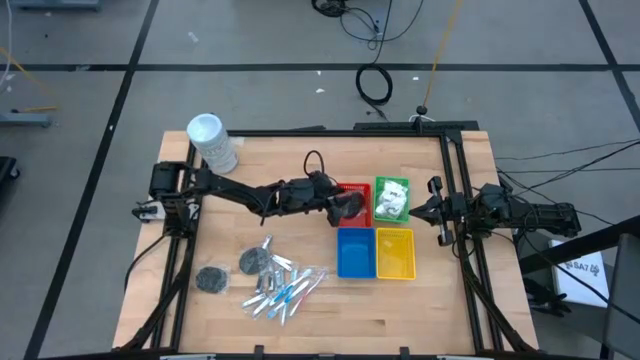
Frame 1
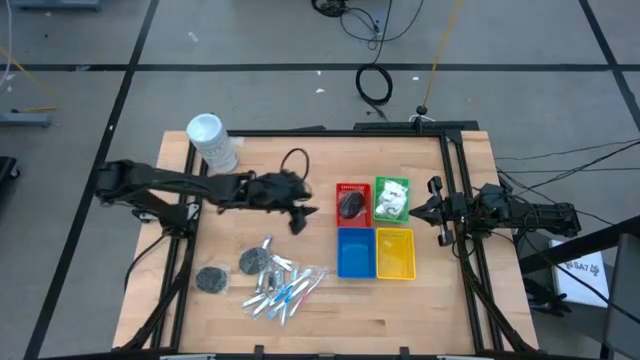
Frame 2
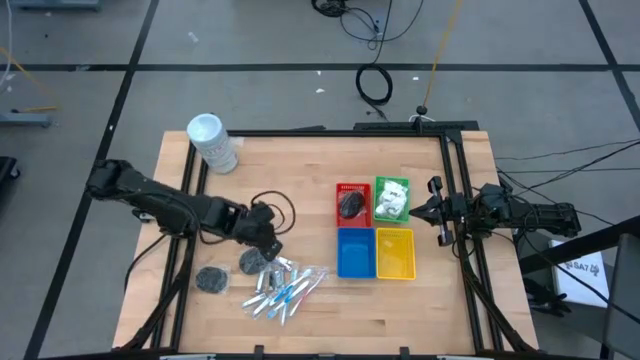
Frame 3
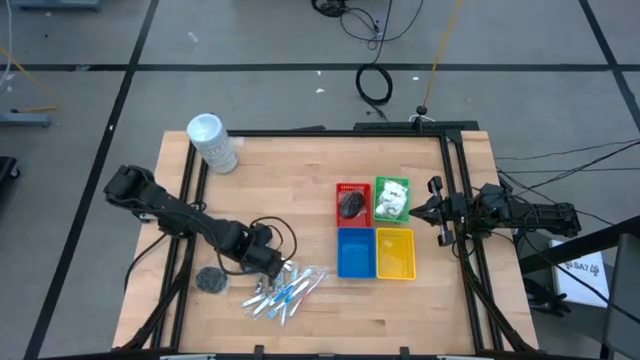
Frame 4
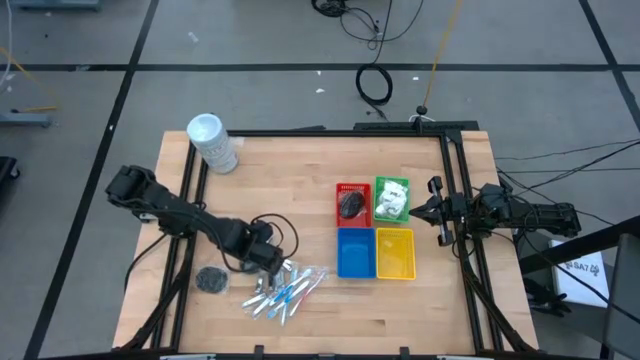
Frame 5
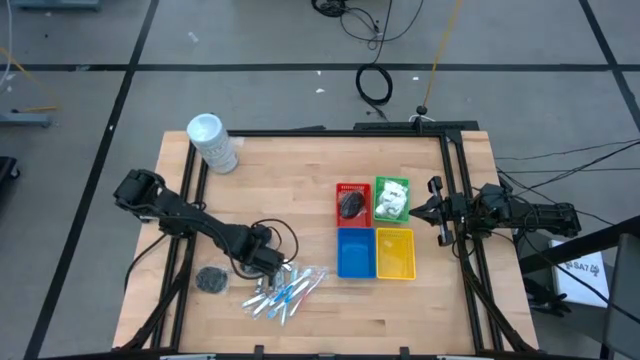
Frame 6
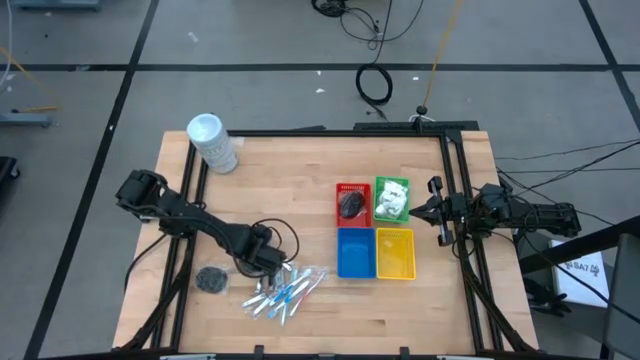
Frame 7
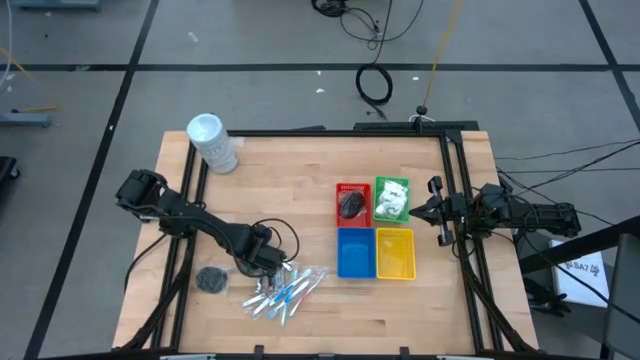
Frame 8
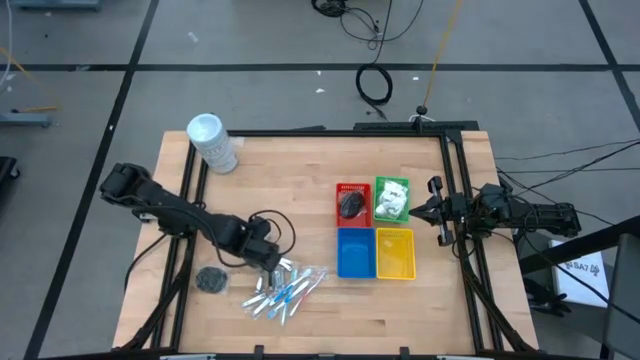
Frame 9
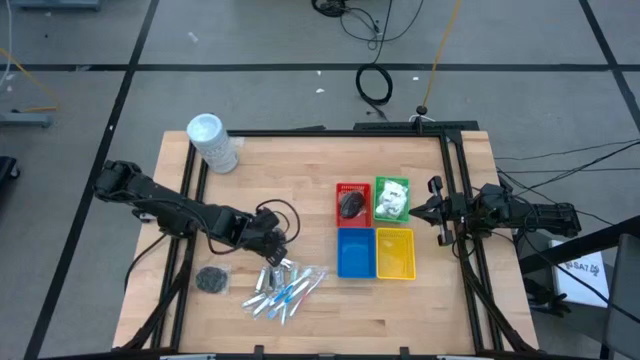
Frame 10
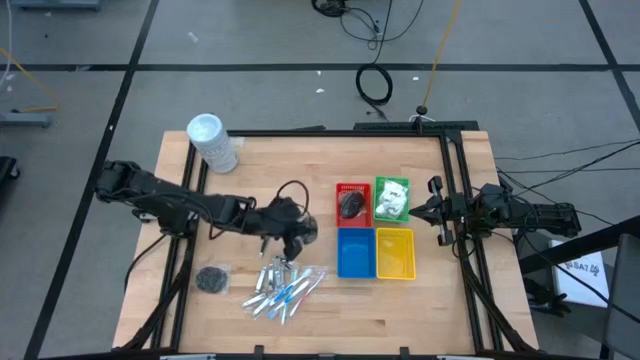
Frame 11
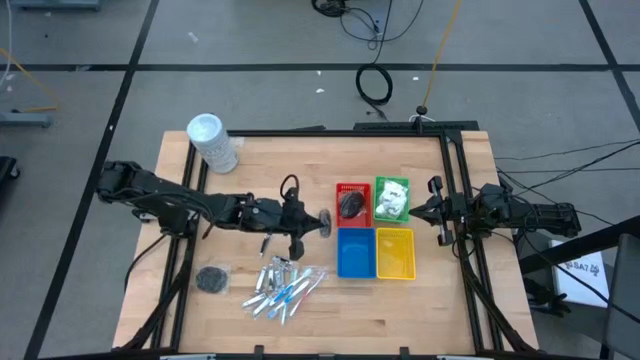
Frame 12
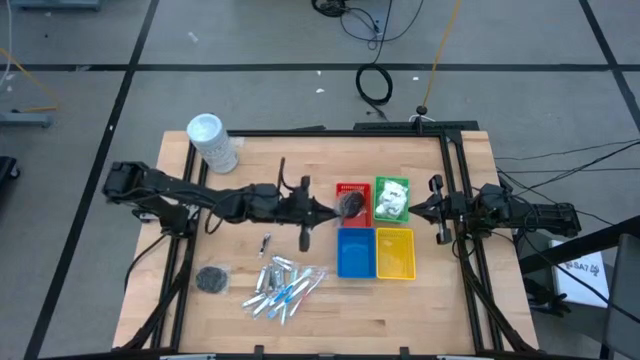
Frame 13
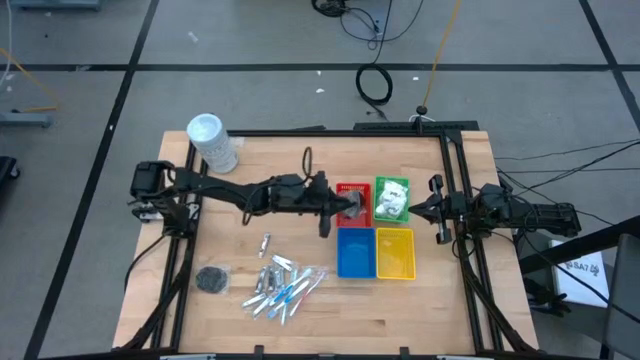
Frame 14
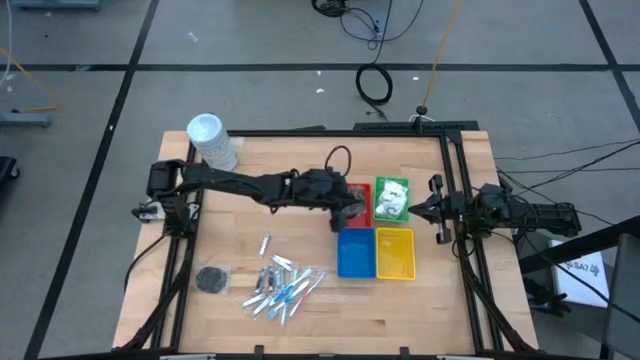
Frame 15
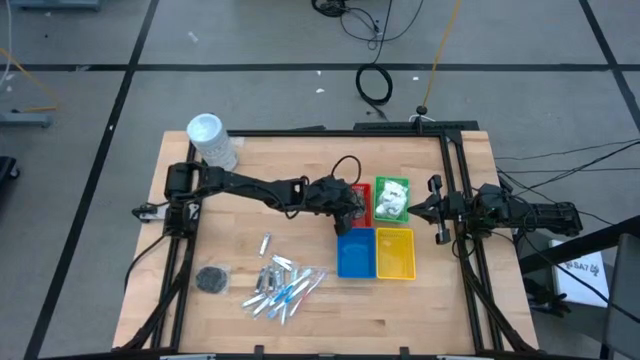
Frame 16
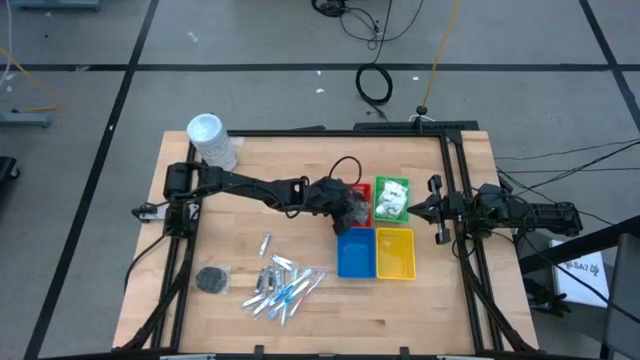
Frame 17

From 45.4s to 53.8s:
Task: Pick & Place Travel size toiletries
Put the black hairbrush into the orange bin

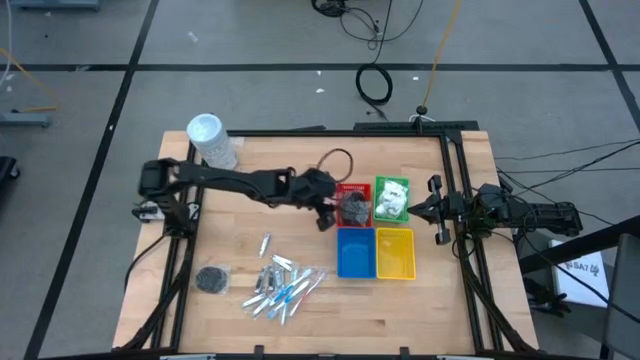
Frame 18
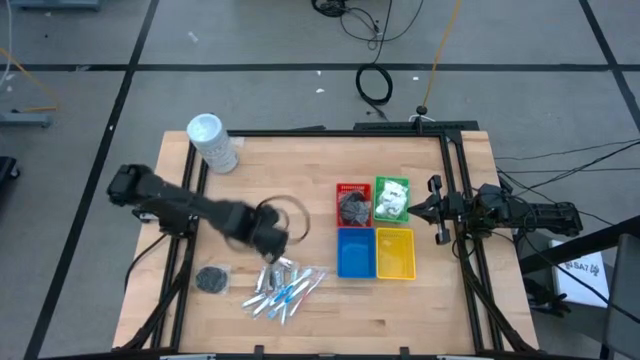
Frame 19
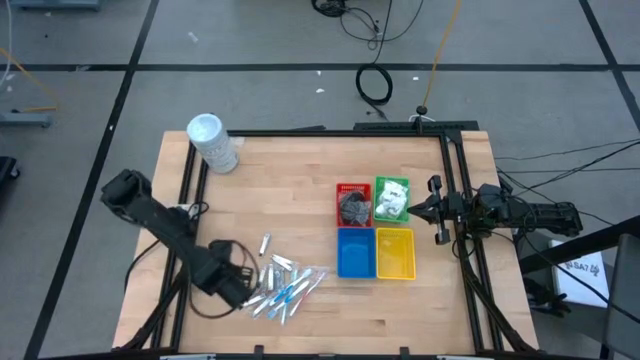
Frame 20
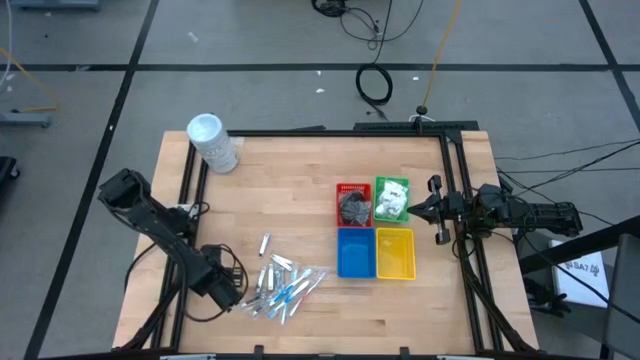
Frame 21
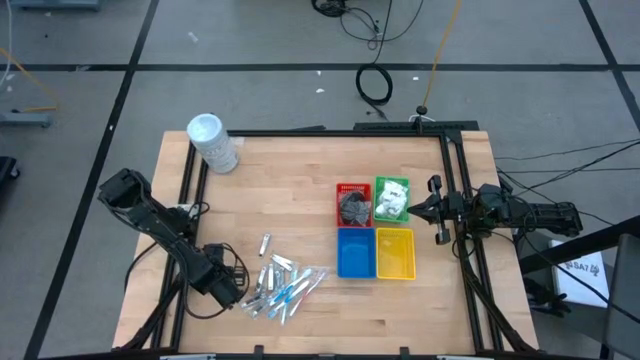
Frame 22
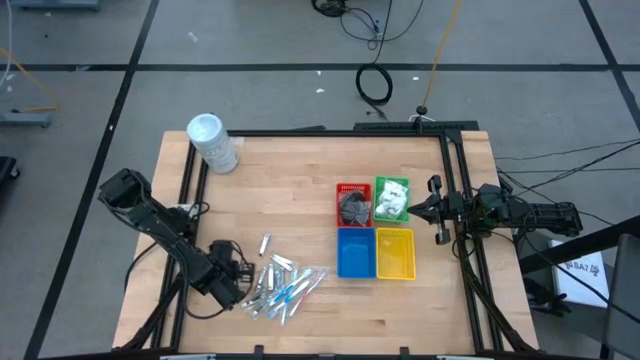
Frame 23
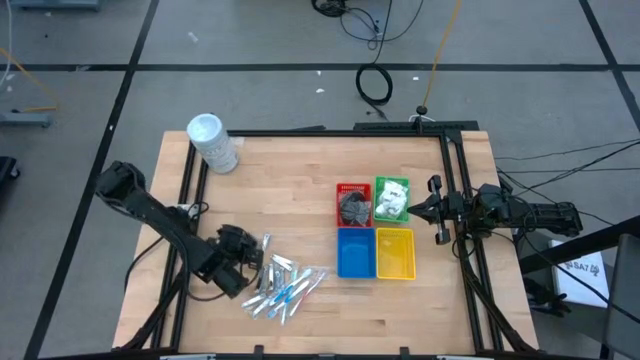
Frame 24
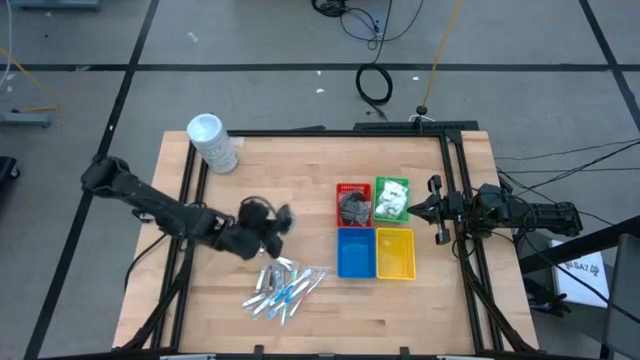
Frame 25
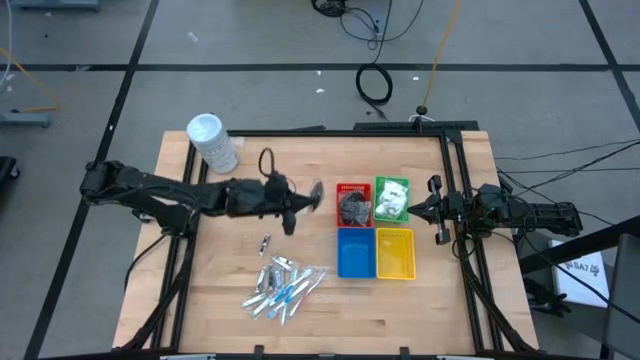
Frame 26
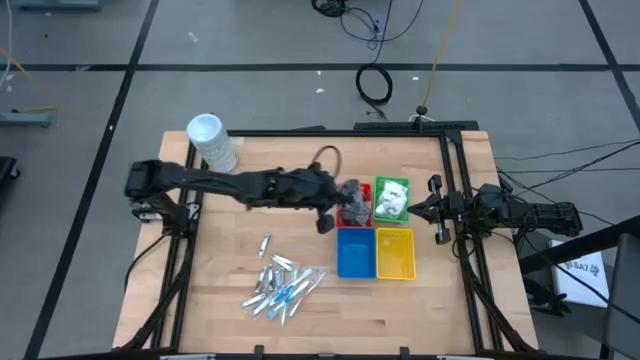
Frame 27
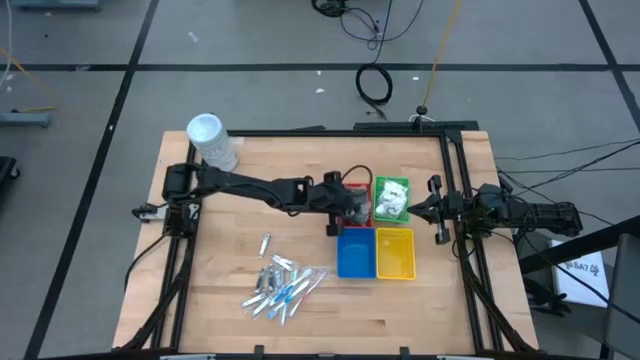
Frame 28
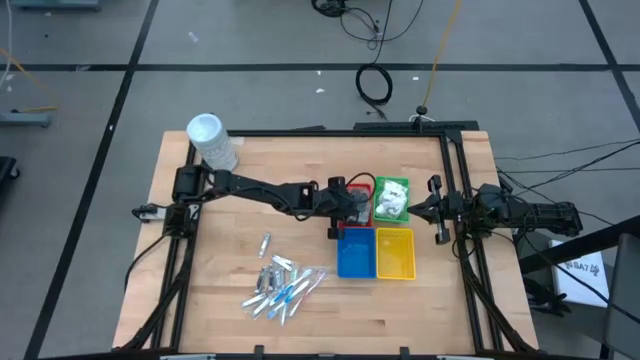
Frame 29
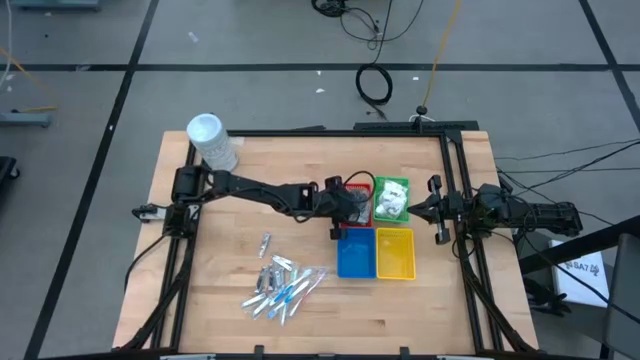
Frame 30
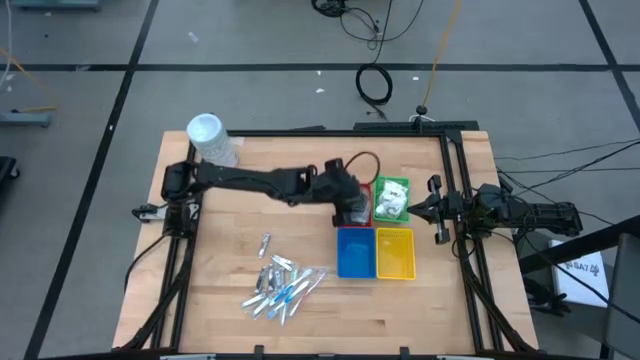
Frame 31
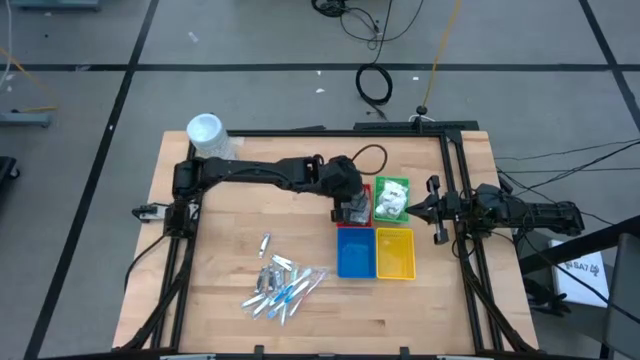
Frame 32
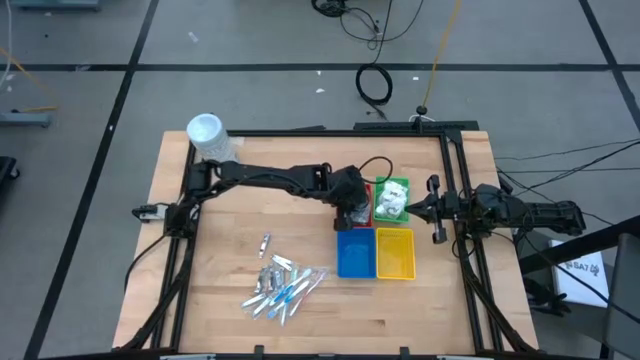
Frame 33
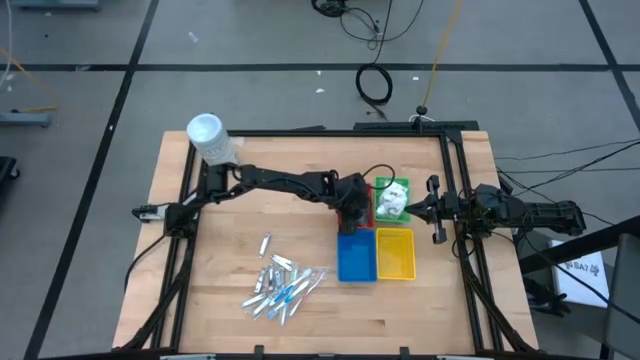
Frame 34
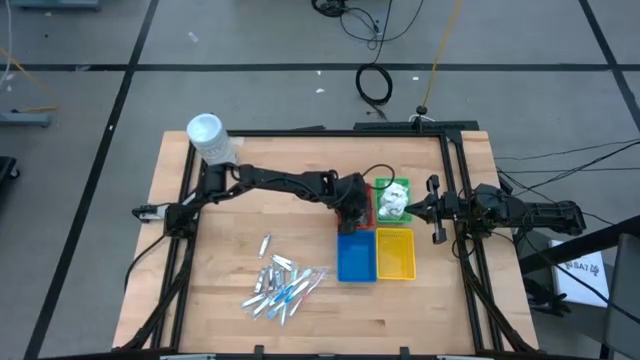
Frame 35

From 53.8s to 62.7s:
Put the black hairbrush into the orange bin

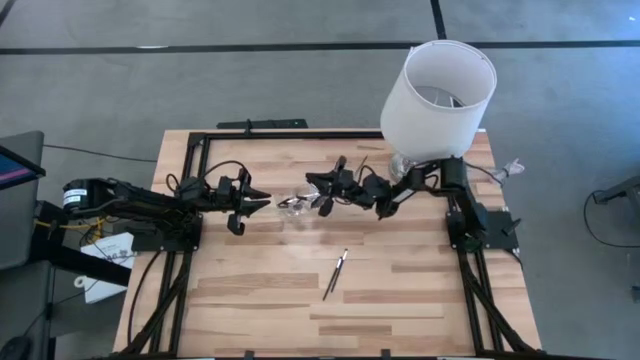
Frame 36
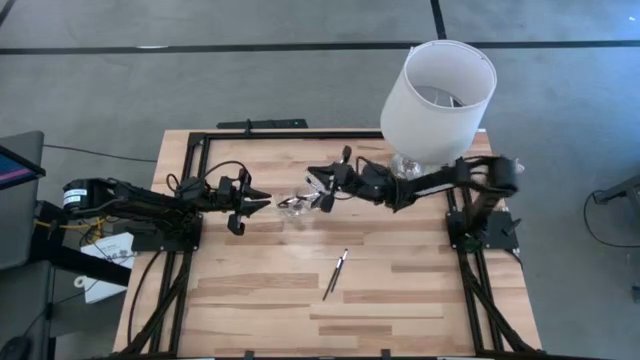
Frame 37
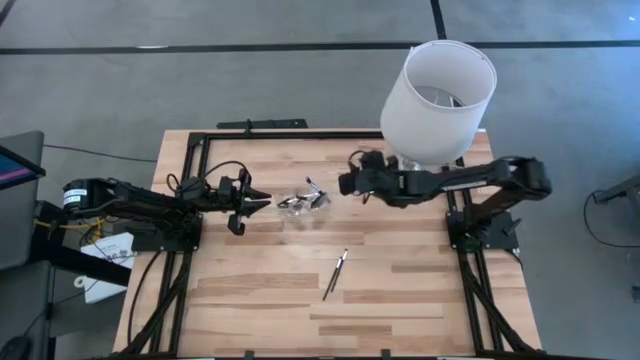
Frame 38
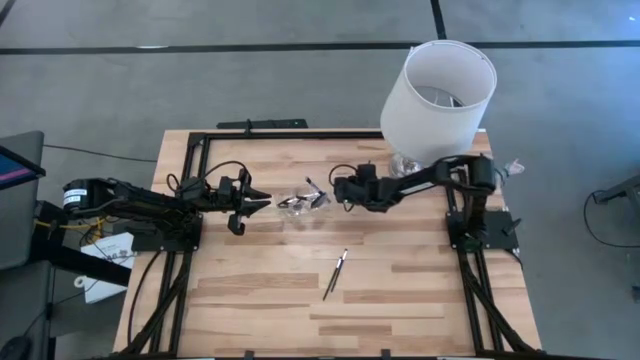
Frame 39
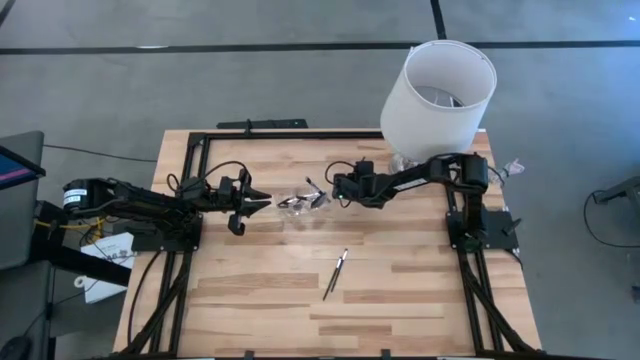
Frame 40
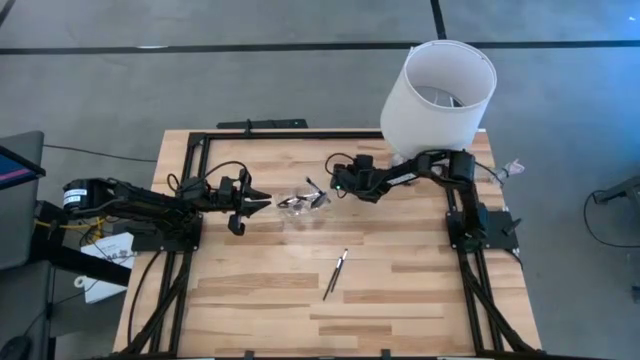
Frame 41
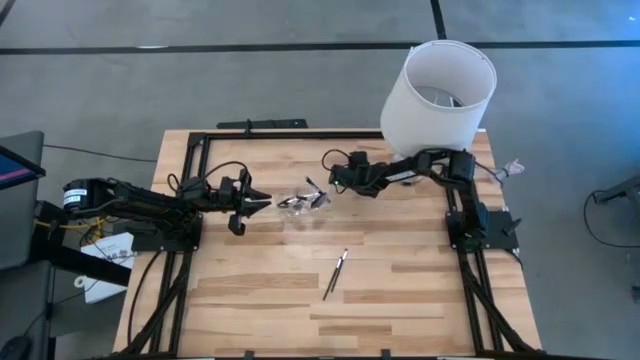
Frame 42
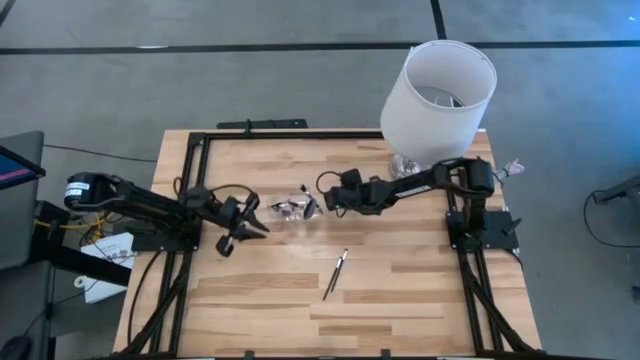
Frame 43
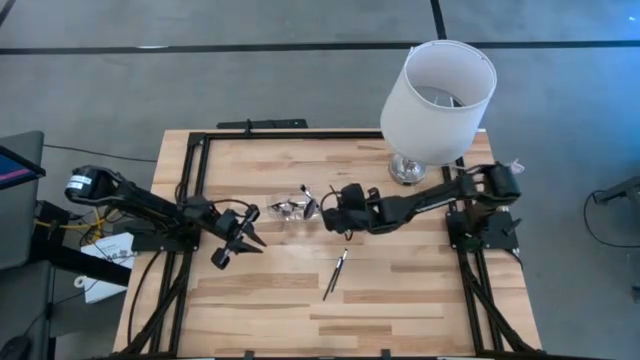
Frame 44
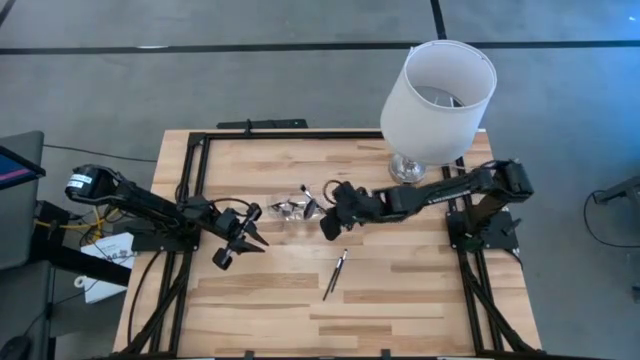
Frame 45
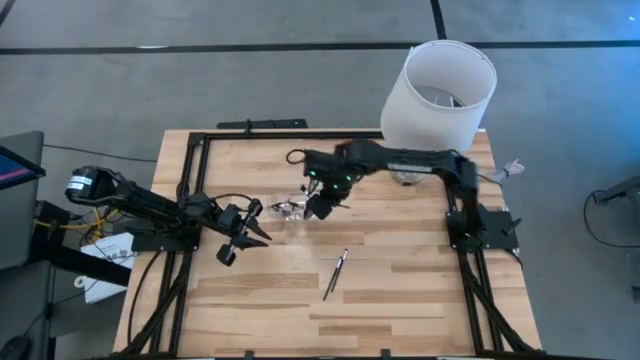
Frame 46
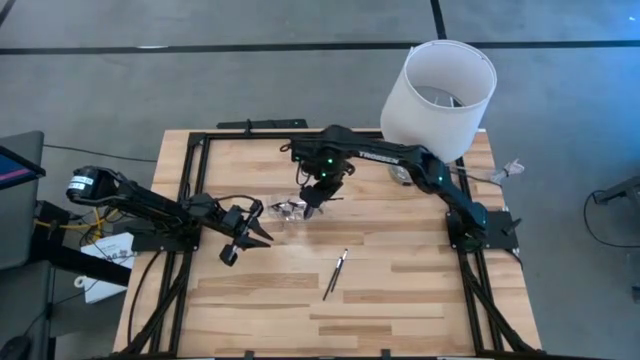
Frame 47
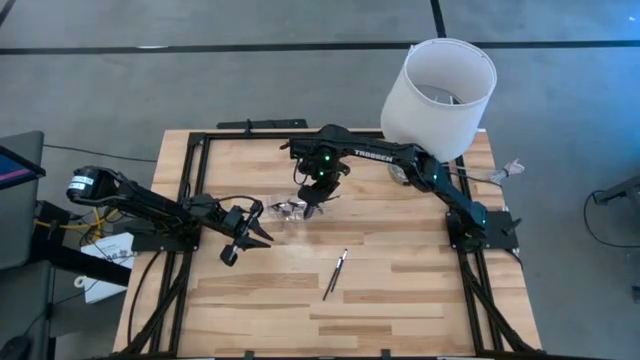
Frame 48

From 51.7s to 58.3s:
Task: Pick & Place Makeup Supplies
Put the black makeup brush into the transparent organizer
